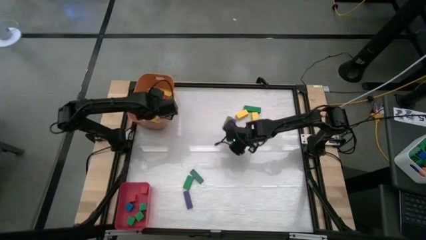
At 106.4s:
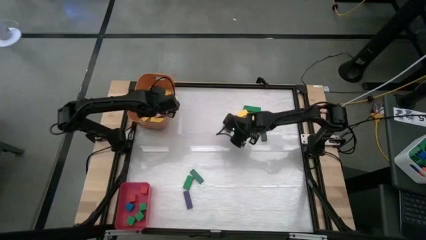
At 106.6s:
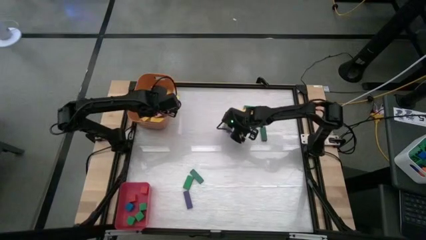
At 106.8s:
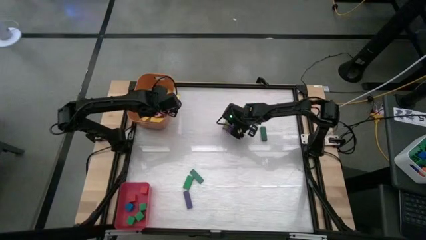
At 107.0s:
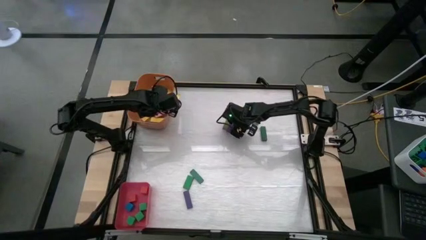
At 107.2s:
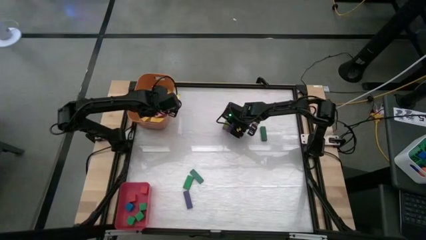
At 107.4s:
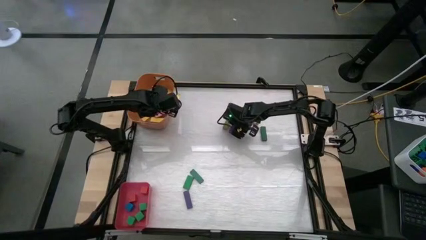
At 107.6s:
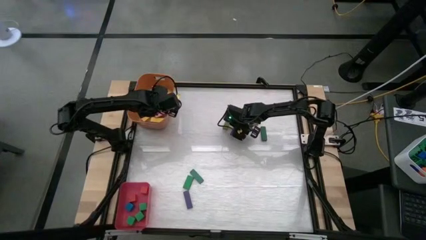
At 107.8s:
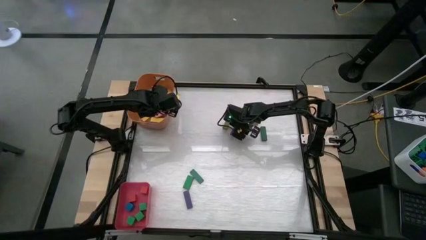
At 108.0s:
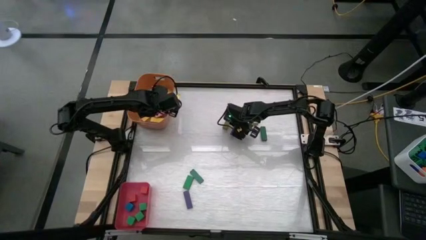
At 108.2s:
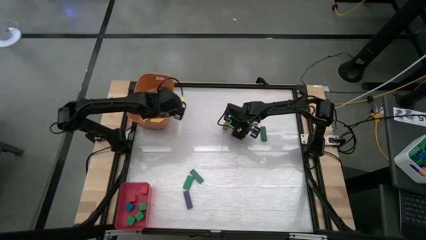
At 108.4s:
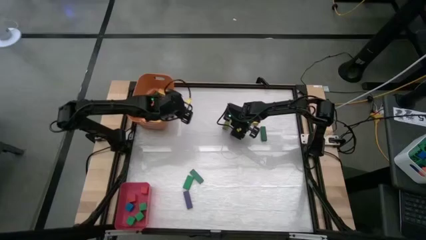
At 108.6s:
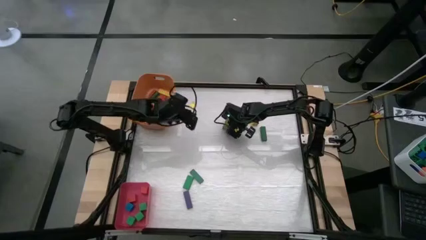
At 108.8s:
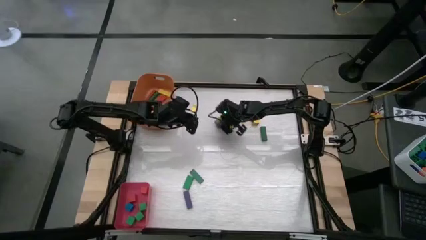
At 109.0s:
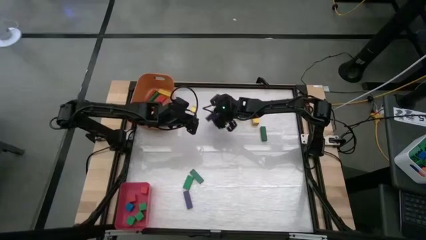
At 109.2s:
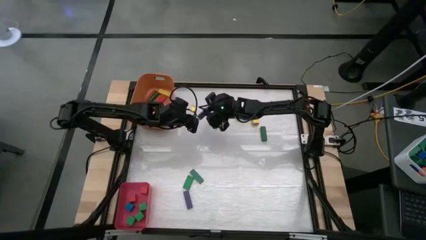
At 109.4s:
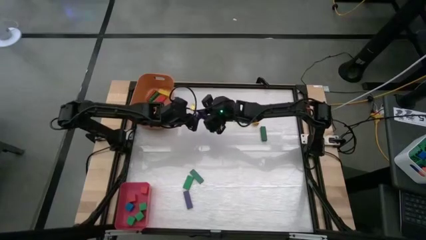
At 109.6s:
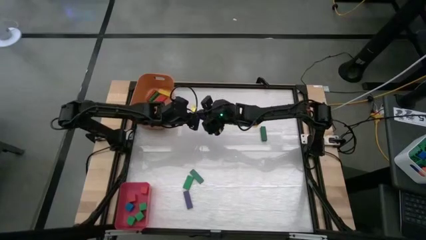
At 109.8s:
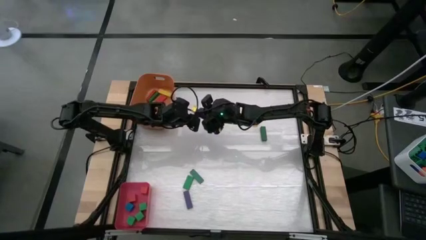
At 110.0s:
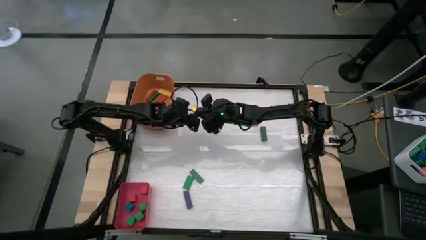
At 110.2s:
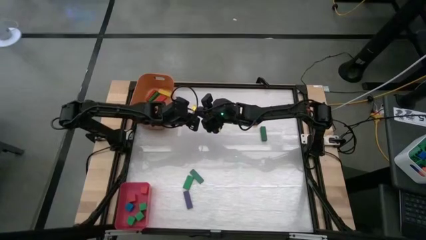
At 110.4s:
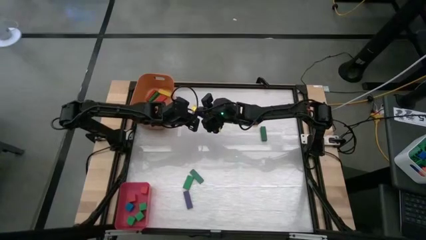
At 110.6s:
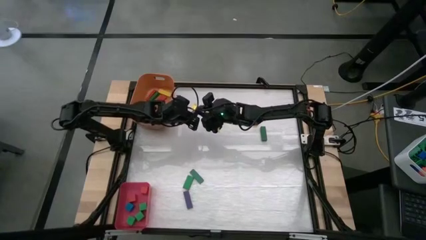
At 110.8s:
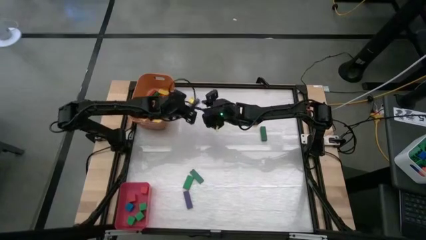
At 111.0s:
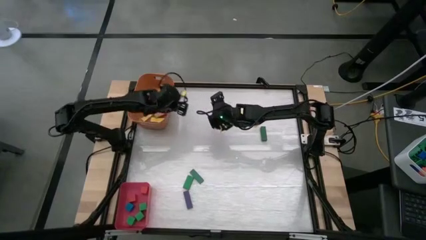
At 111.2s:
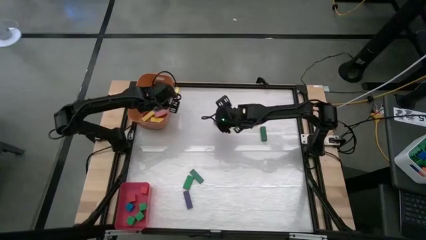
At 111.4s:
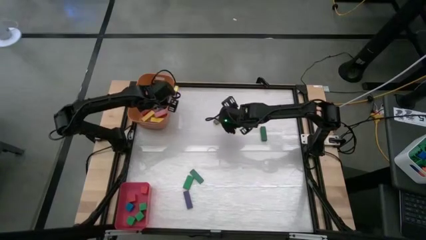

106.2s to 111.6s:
Task: Sort blocks by size
Put the big purple block into the orange bin

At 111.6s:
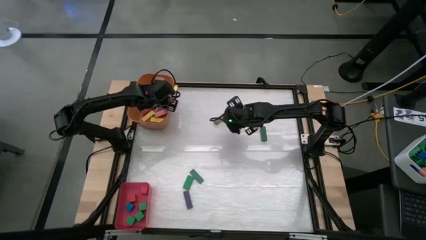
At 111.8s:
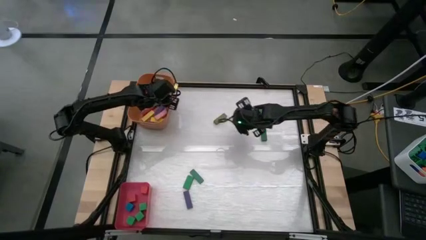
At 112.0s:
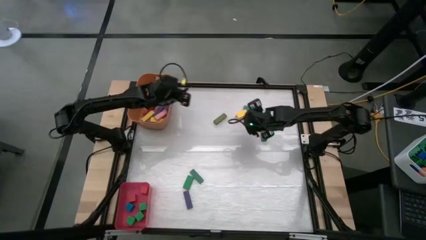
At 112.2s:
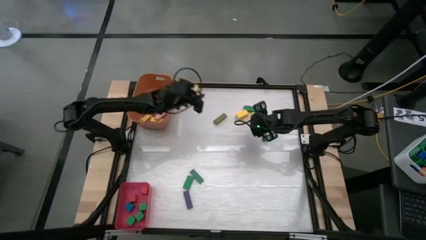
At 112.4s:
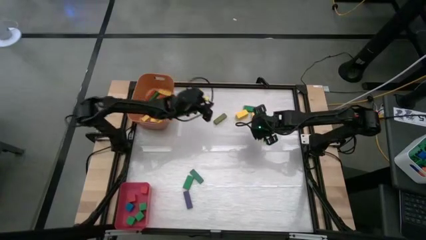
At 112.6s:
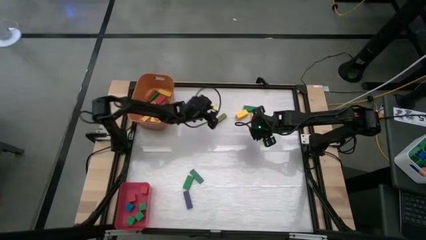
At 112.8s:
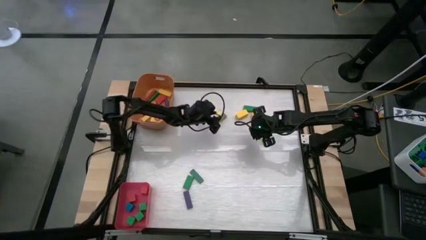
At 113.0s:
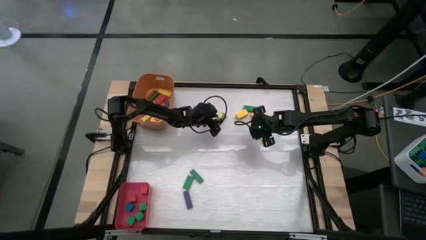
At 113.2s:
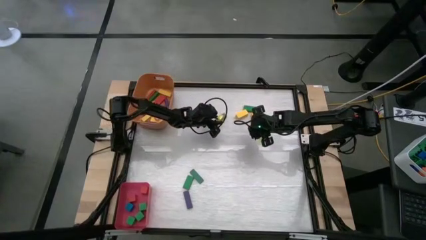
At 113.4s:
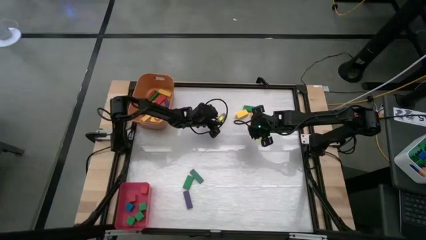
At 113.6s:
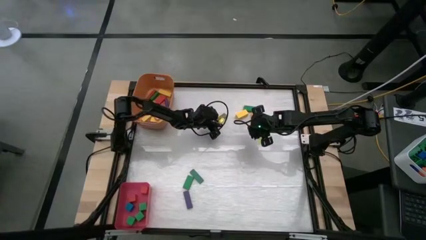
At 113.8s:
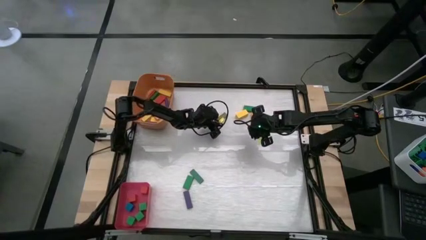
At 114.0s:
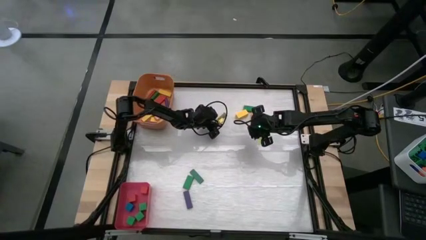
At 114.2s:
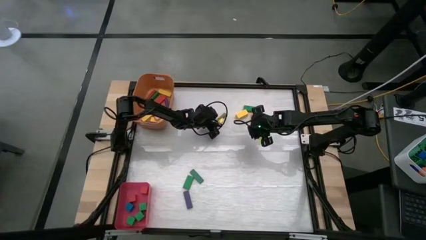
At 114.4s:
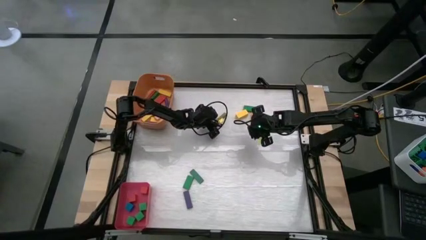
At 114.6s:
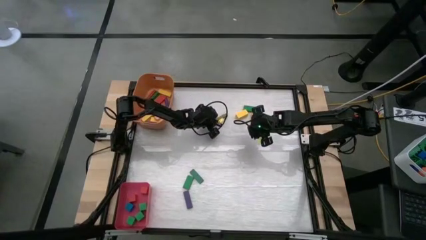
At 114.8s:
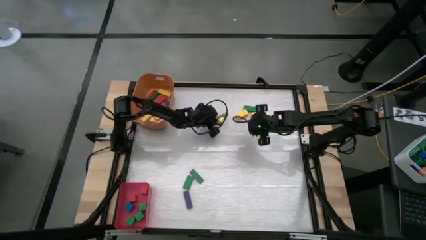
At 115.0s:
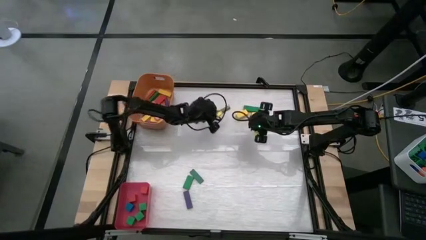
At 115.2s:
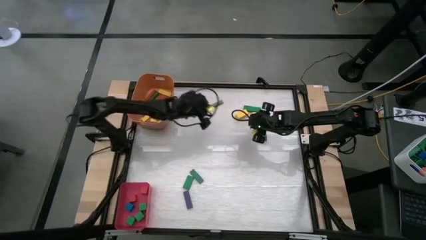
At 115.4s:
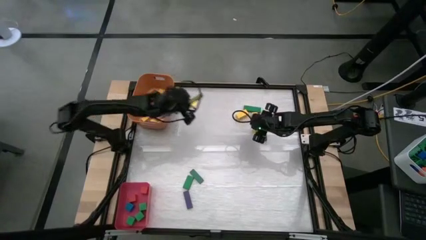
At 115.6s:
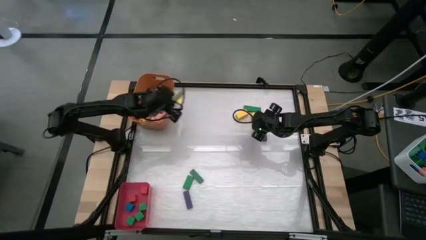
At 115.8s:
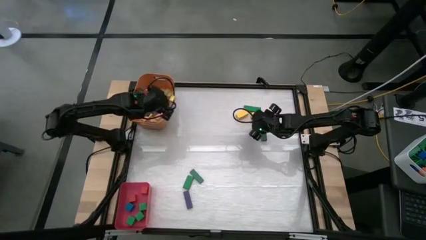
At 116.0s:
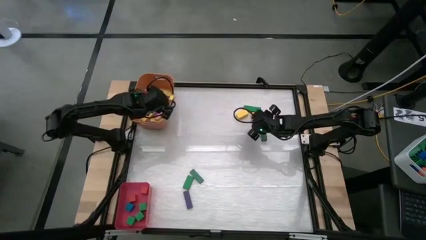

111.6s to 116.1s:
Put the big green block into the orange bin

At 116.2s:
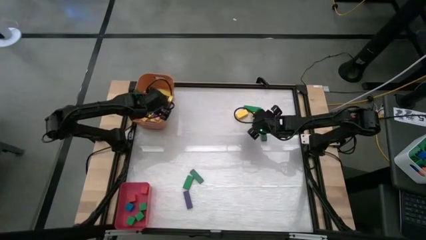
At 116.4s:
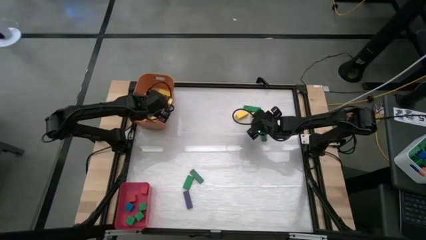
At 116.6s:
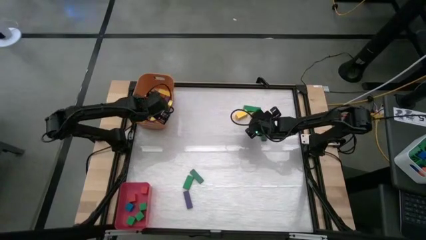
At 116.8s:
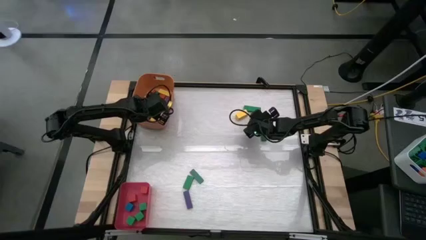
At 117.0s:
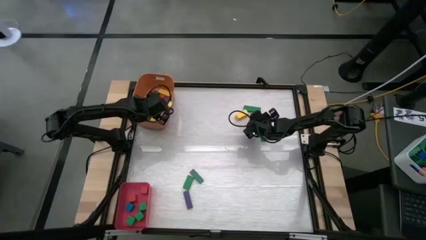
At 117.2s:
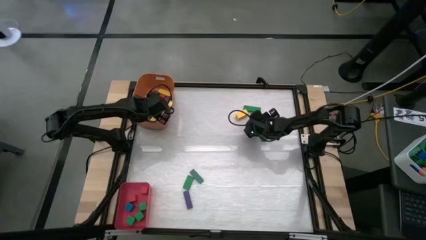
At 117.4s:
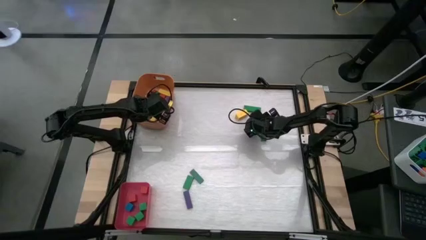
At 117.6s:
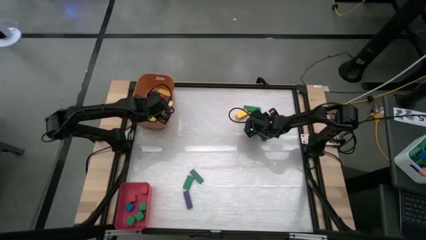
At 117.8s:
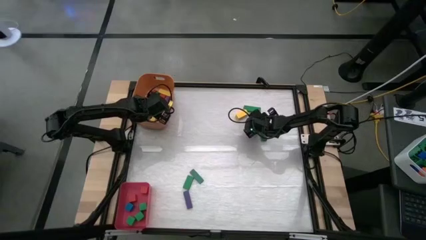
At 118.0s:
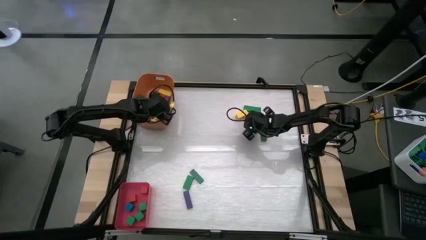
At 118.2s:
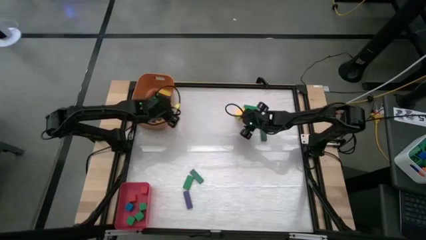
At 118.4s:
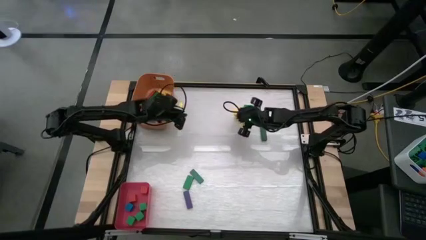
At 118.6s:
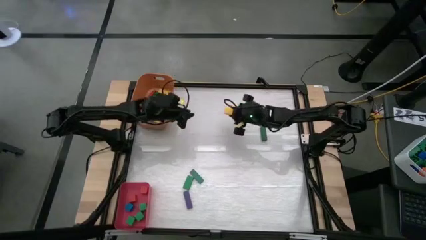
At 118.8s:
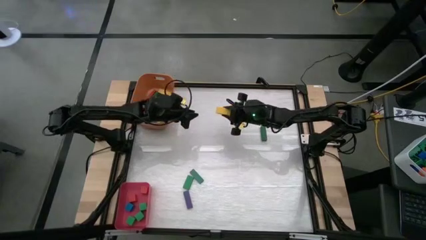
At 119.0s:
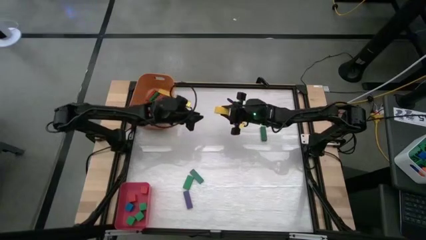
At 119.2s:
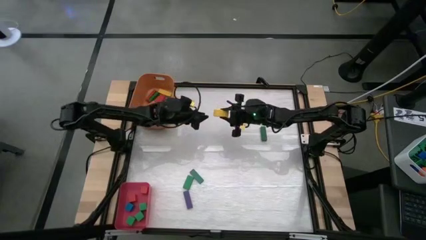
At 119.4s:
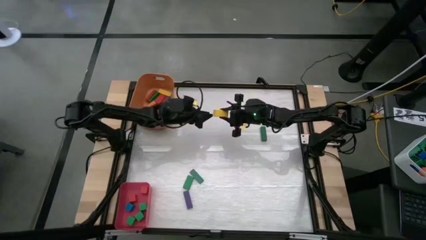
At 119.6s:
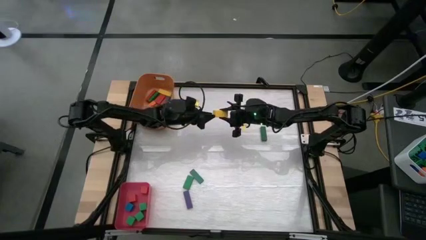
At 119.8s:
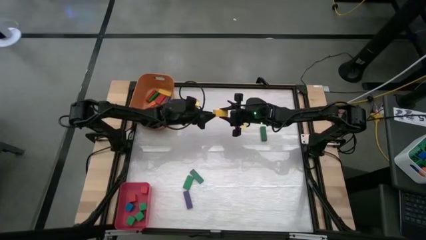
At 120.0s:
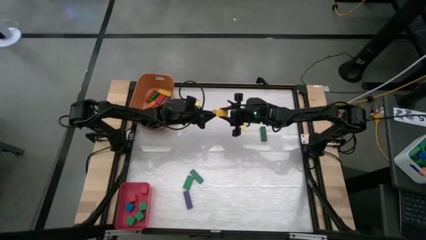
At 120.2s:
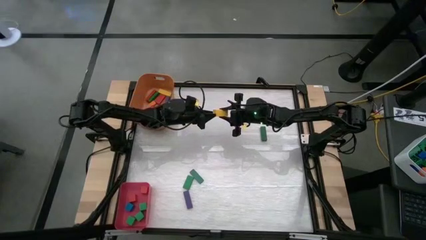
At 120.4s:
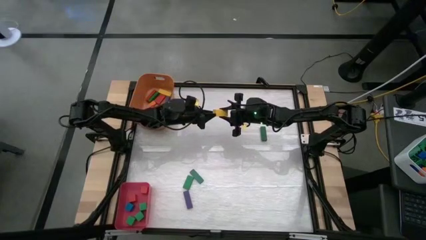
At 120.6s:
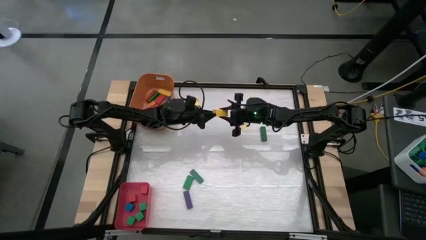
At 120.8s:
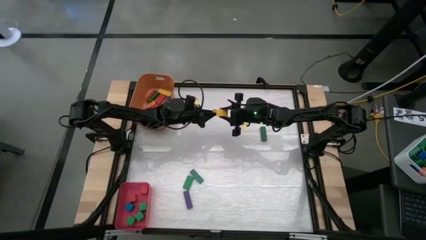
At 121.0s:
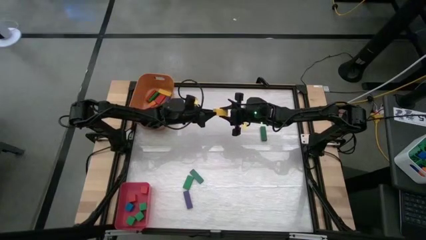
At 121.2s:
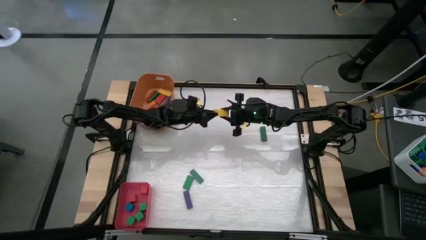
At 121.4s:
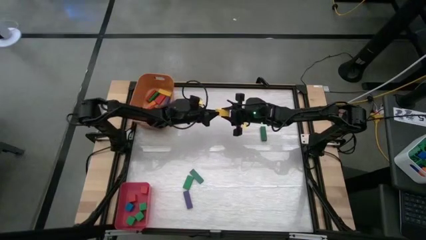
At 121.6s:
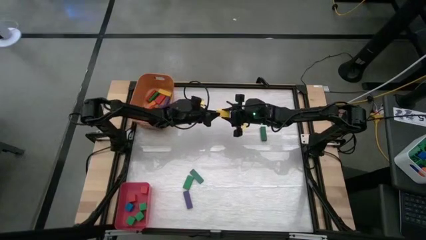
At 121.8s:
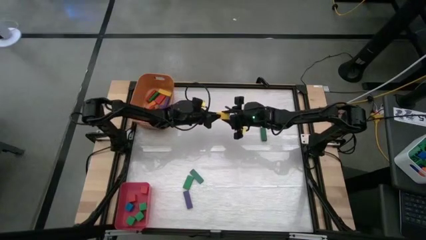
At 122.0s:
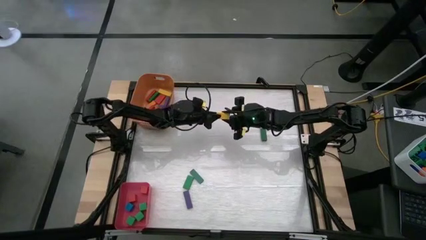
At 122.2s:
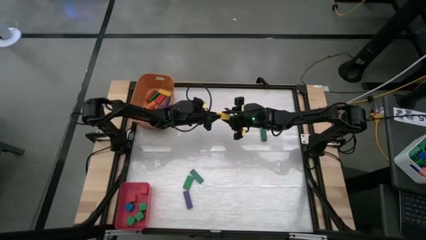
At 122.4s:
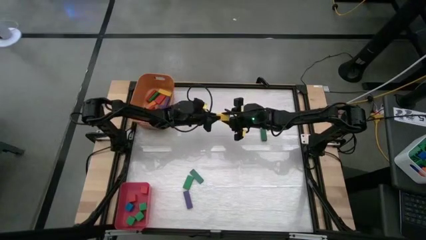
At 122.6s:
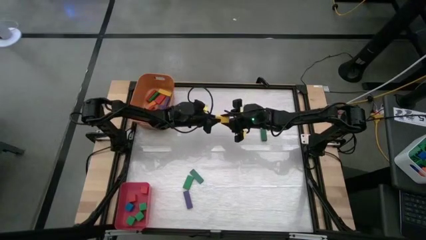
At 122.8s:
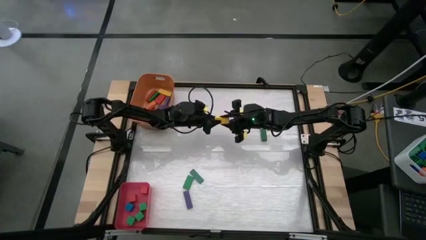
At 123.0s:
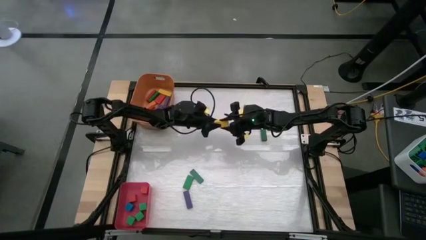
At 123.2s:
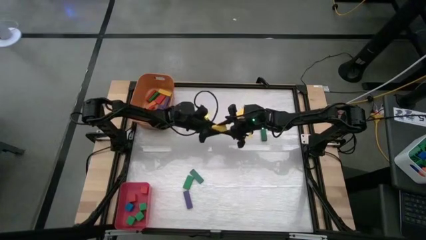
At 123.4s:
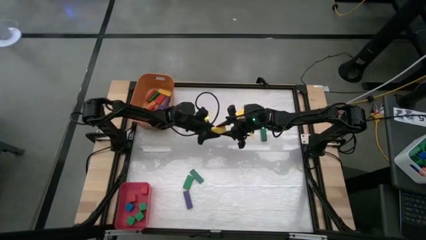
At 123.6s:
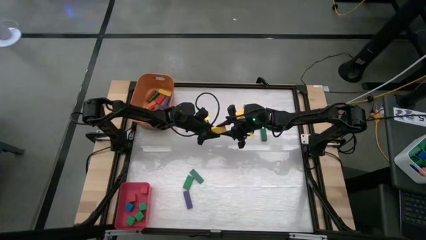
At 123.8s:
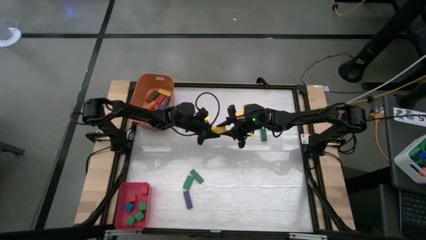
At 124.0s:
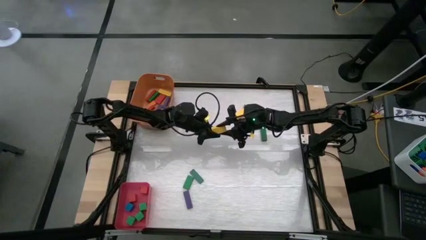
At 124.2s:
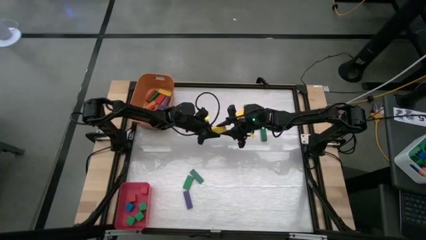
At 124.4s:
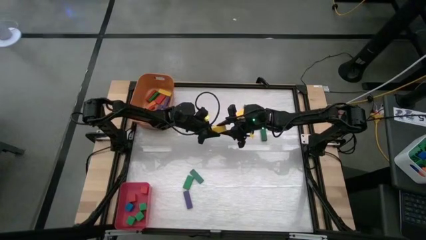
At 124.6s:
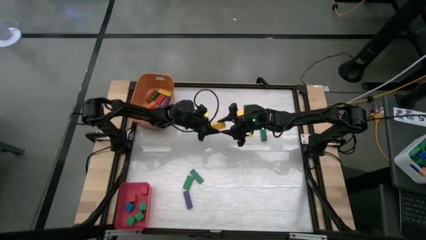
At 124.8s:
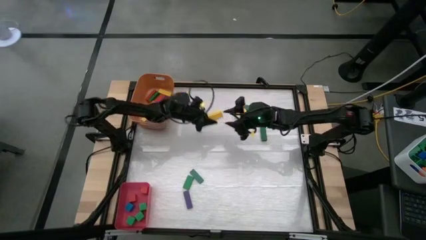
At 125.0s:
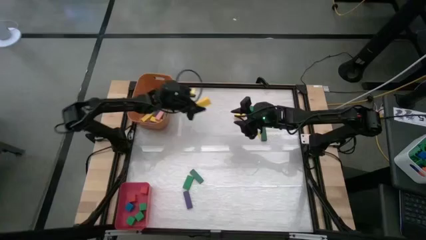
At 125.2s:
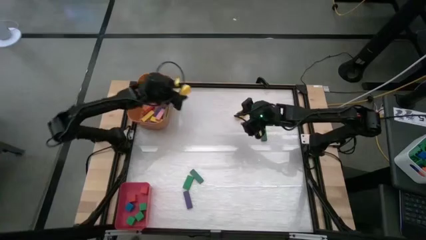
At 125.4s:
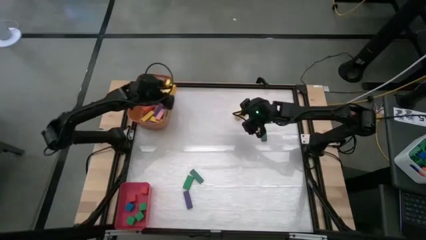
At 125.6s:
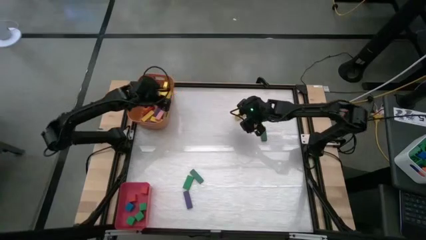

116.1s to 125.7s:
Put the big yellow block into the orange bin
